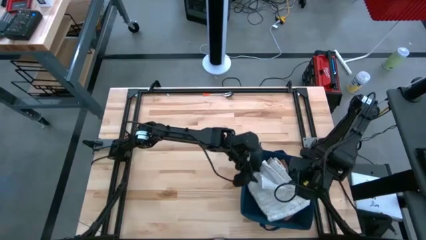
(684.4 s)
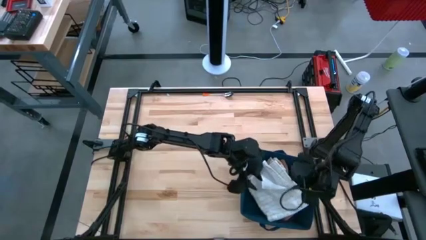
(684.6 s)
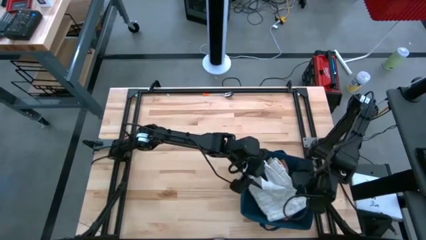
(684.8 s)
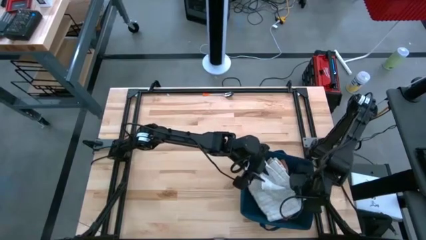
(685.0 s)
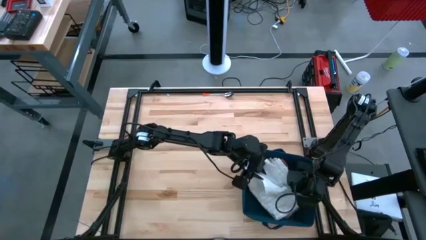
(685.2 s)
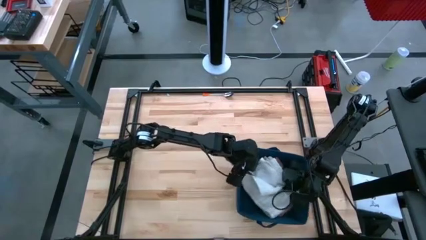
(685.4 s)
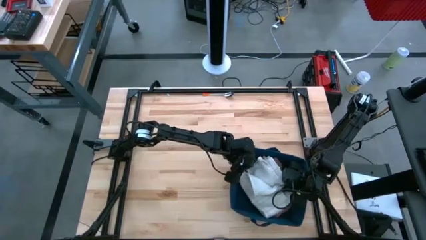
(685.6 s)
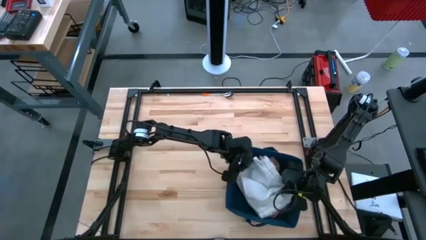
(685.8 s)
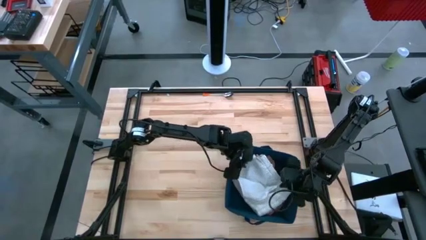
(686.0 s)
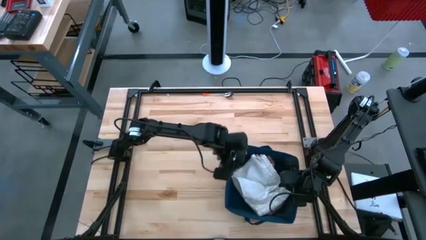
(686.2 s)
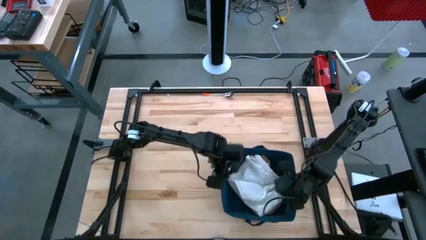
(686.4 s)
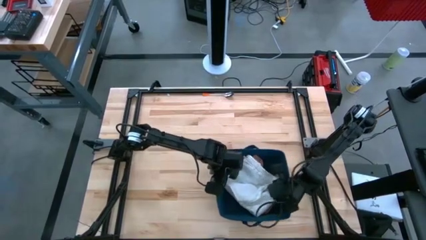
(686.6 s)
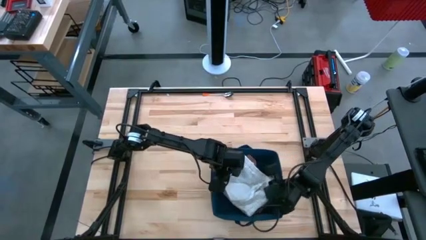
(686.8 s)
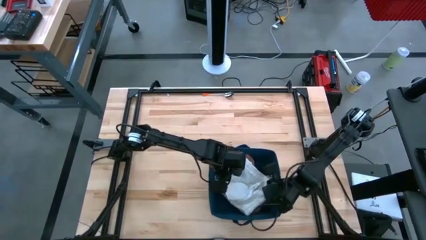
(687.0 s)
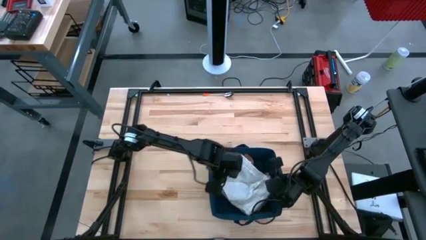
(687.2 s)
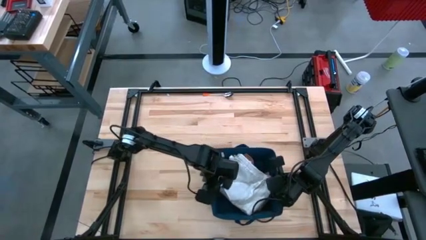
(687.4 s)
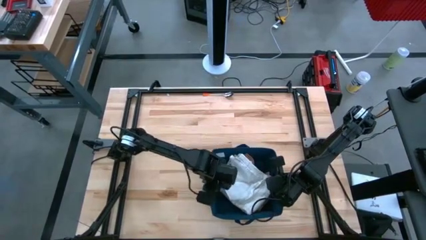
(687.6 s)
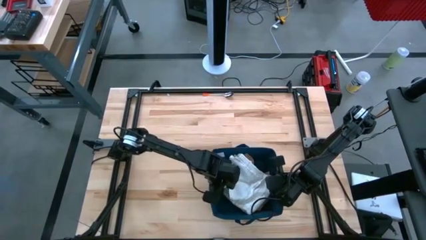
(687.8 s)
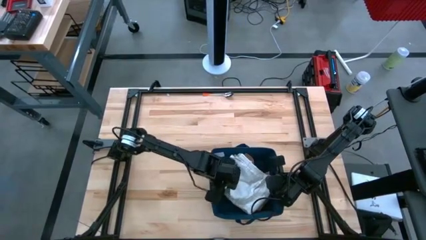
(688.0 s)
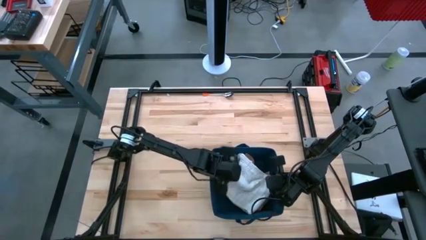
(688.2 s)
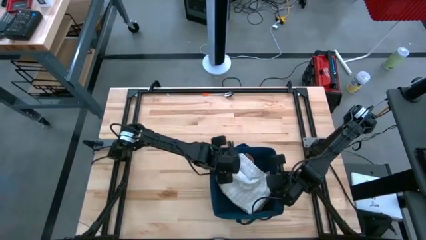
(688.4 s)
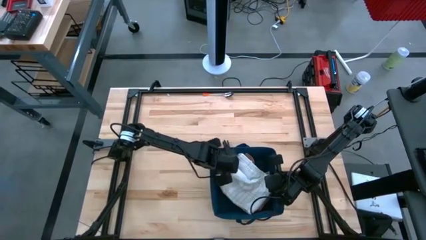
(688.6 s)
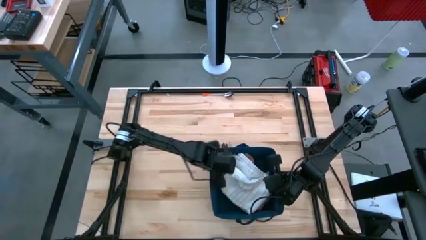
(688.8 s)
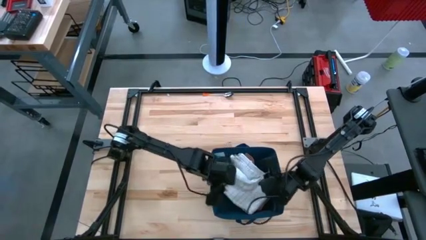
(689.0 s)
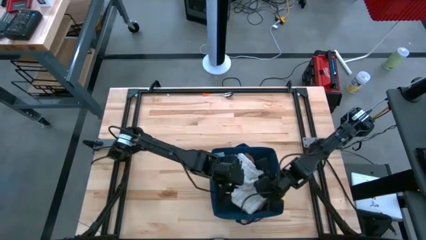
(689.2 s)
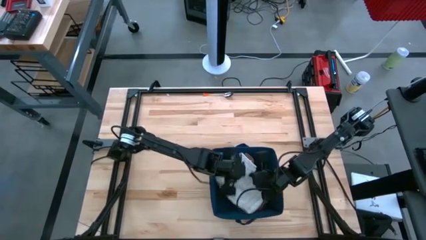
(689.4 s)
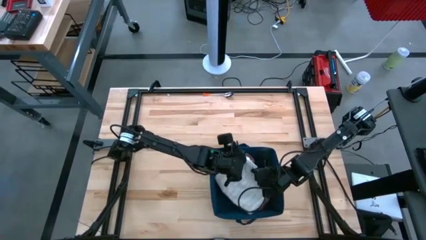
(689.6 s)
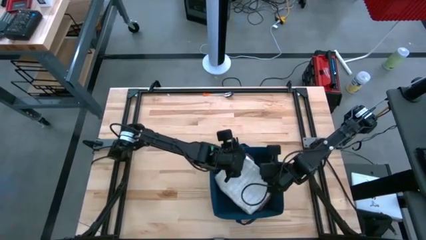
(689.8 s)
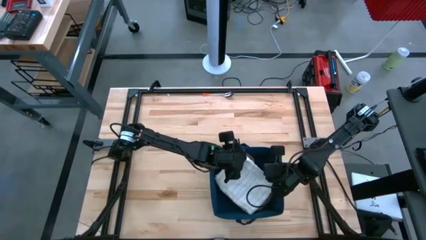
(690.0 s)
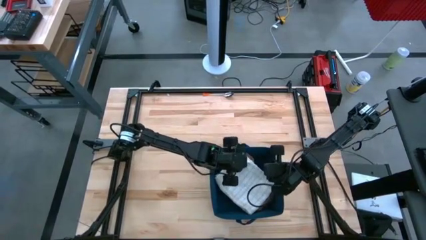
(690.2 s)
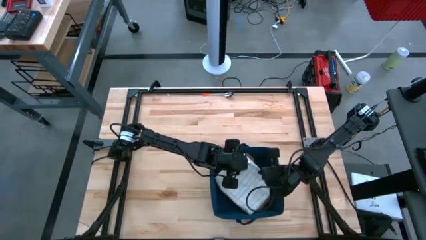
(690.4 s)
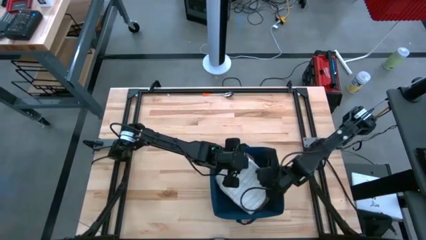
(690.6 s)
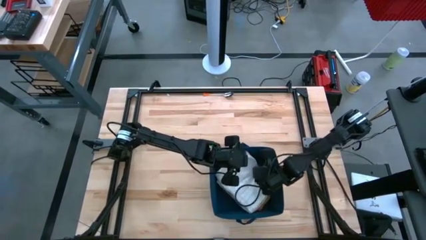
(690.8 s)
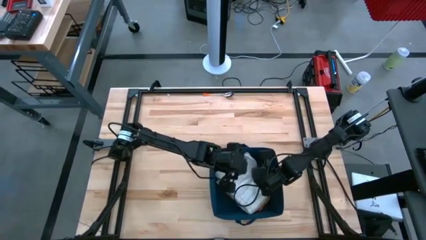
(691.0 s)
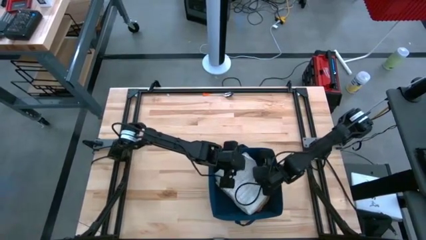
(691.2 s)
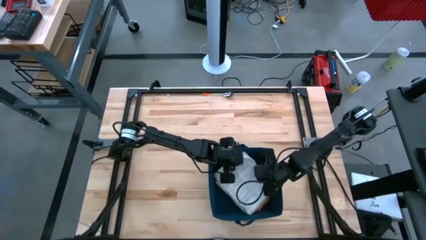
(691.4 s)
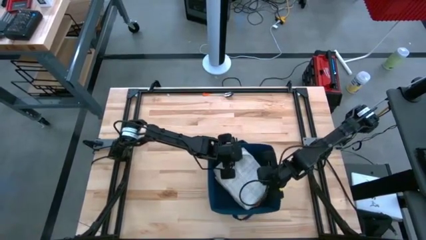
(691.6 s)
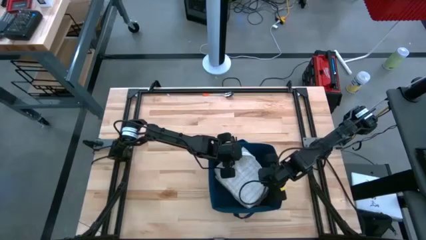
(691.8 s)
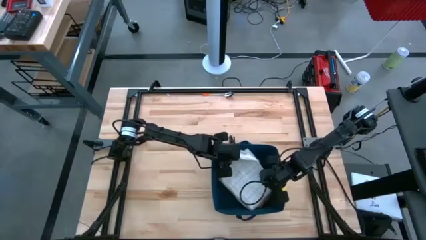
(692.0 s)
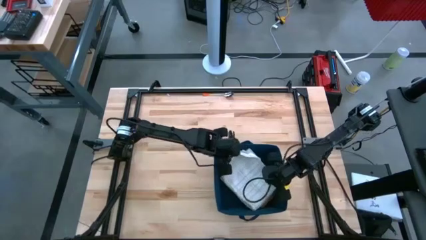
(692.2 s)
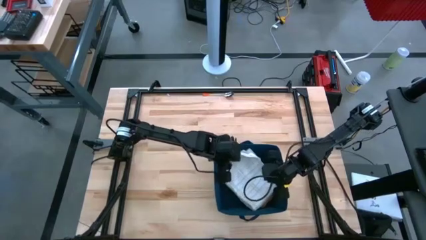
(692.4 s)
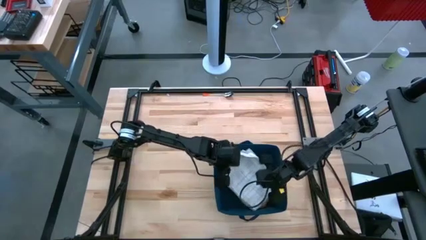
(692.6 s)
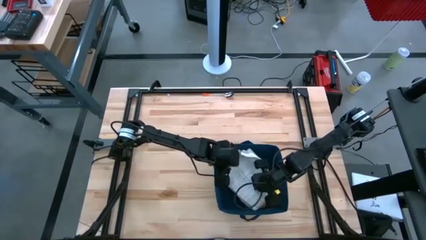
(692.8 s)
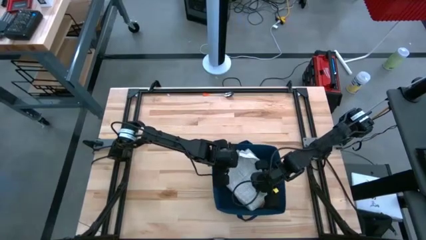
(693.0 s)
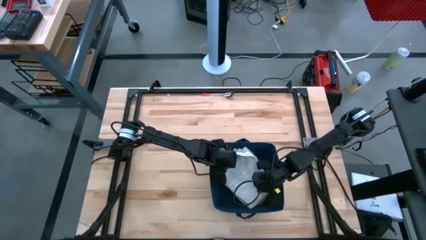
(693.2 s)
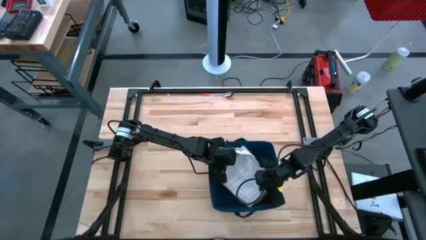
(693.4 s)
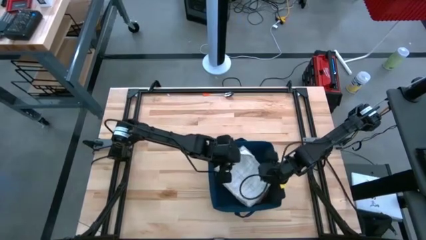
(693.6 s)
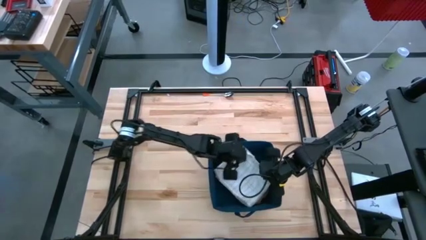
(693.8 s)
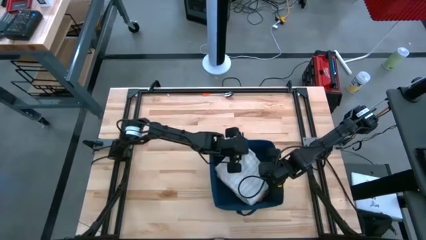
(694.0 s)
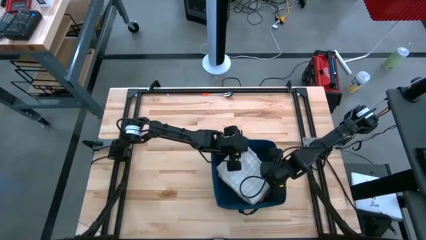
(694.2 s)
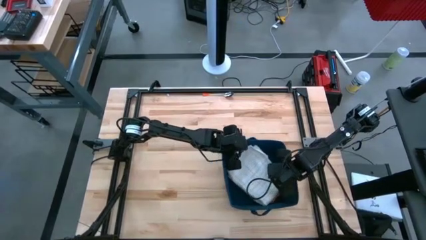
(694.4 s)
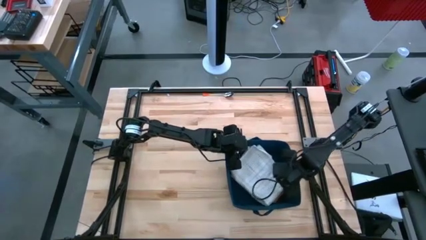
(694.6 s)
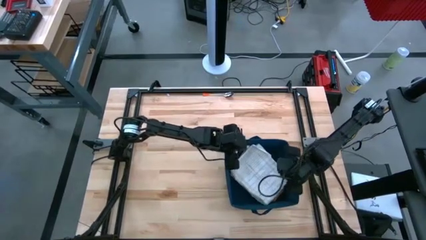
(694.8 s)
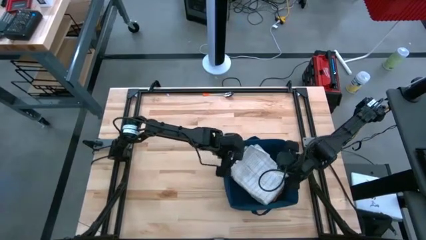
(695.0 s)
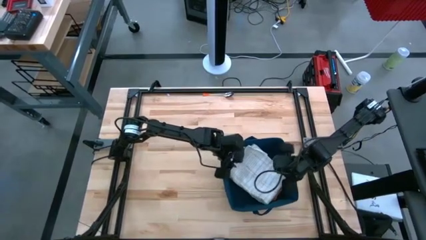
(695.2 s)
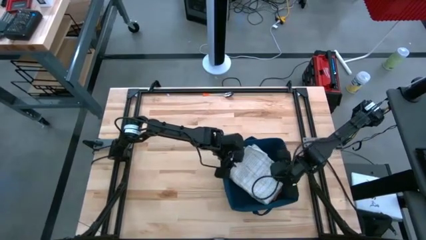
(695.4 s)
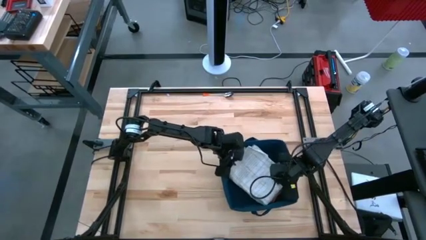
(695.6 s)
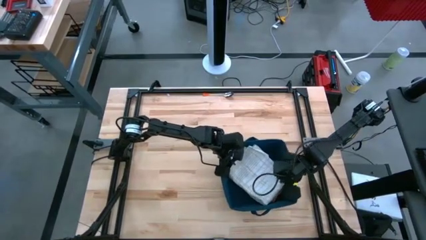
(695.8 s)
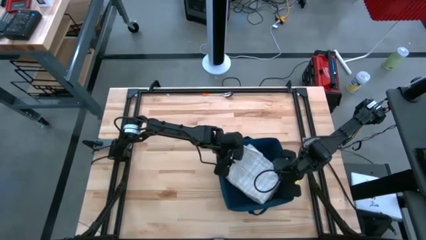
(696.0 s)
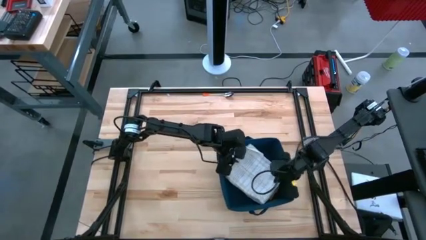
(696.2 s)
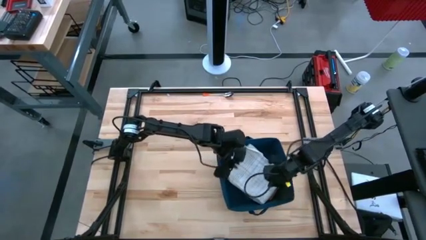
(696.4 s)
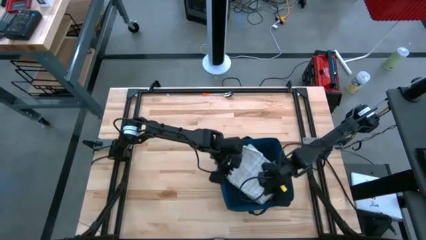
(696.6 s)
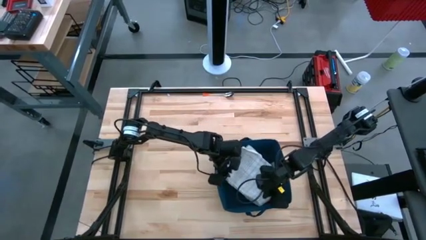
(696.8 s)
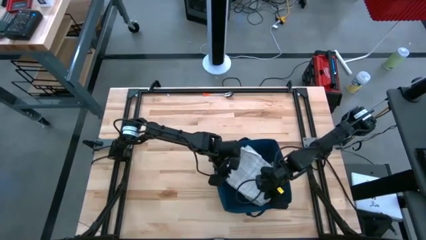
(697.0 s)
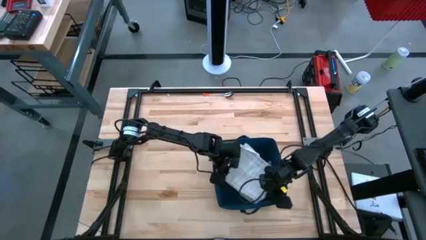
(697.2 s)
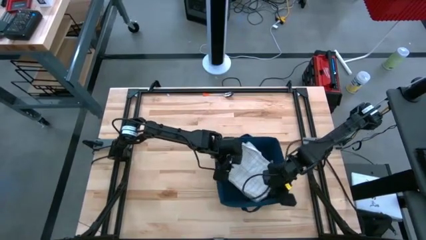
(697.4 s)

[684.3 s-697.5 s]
Task: Fold towel
Put the stacked folded towels into the laundry bin
